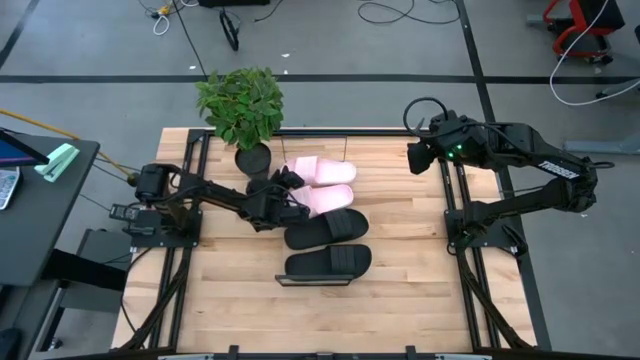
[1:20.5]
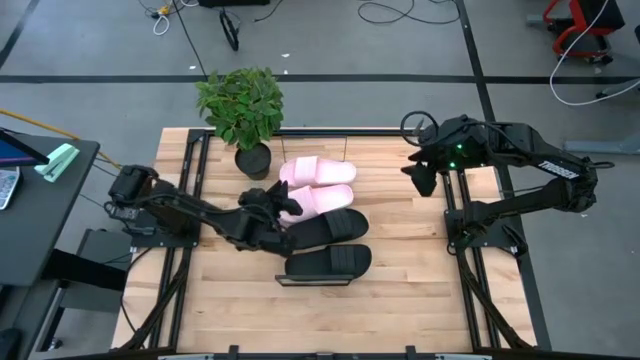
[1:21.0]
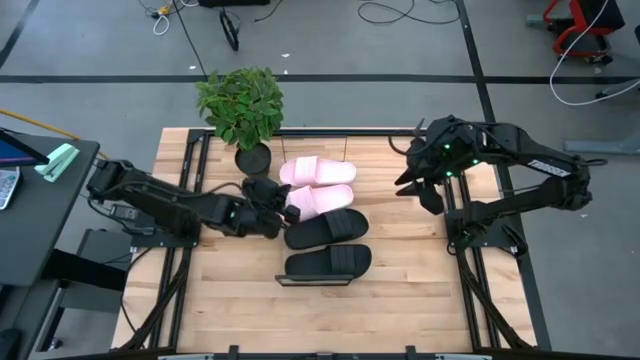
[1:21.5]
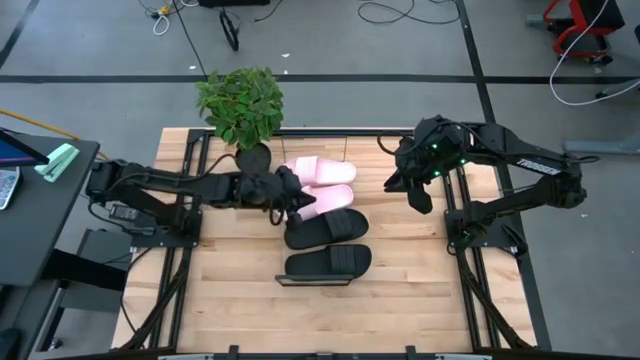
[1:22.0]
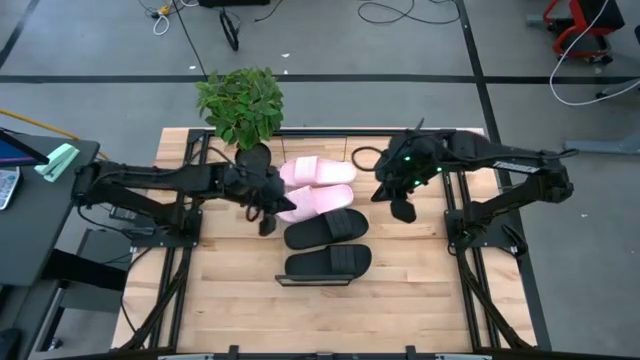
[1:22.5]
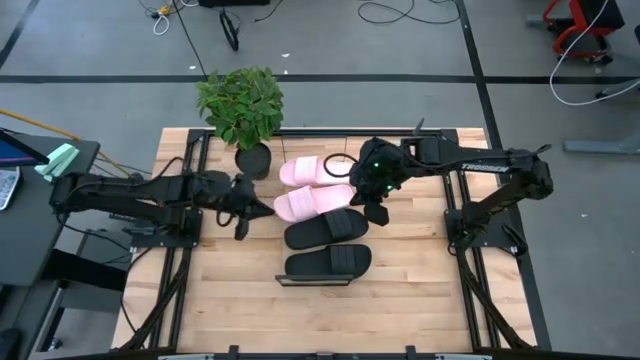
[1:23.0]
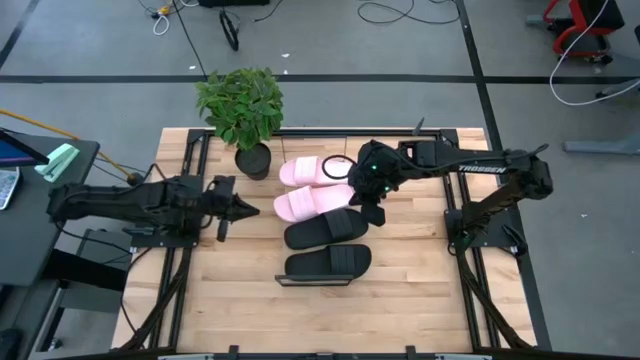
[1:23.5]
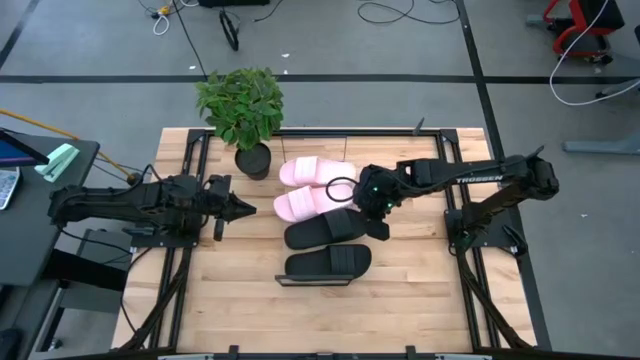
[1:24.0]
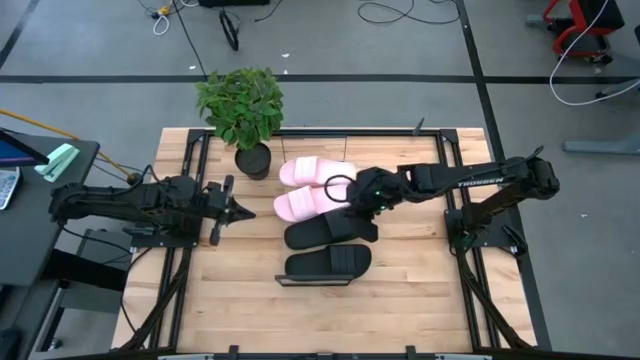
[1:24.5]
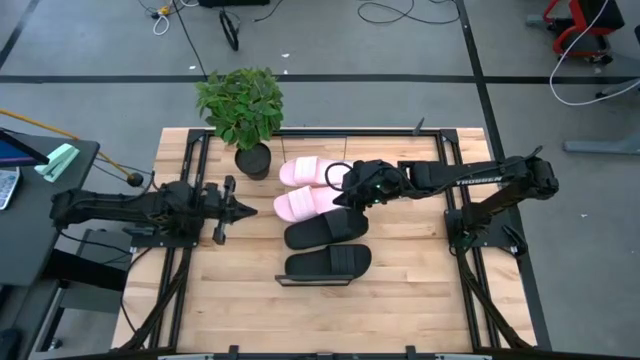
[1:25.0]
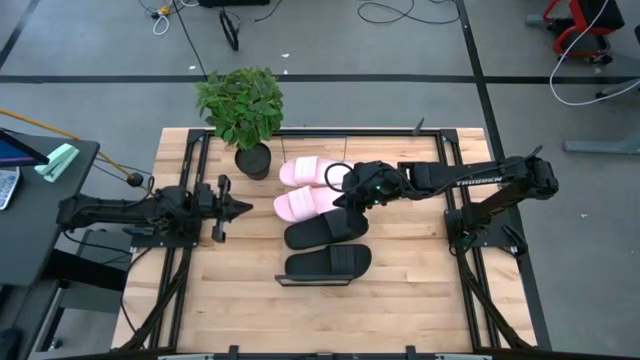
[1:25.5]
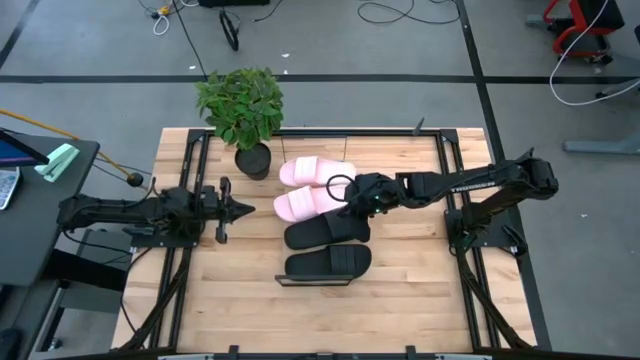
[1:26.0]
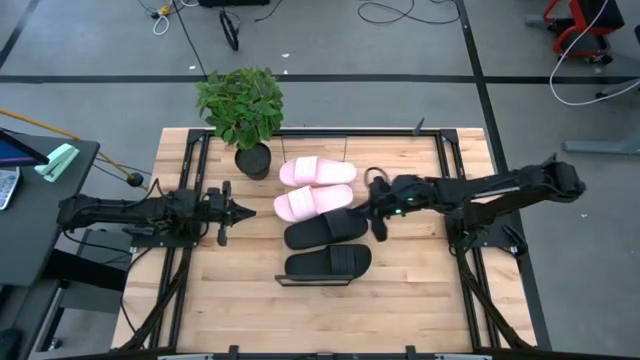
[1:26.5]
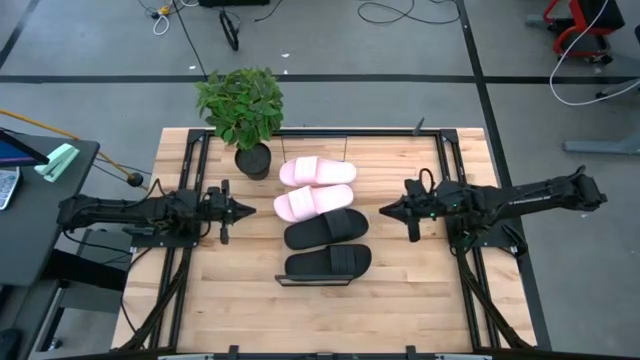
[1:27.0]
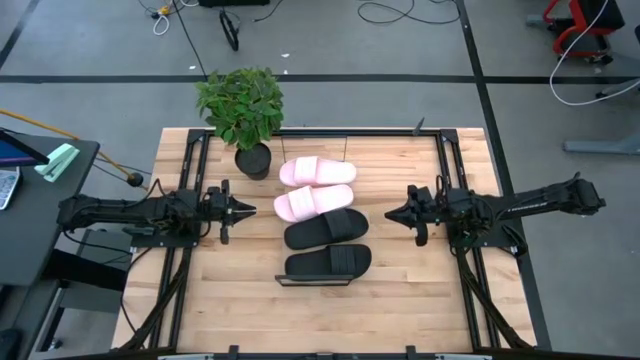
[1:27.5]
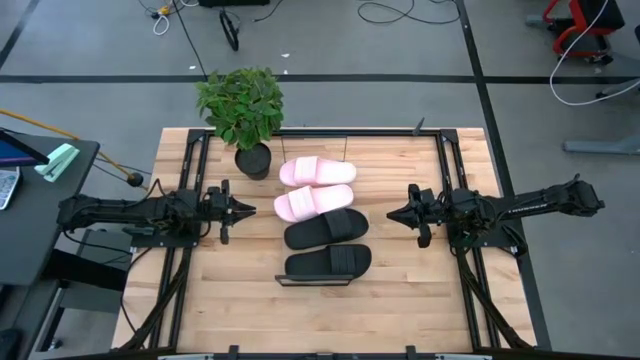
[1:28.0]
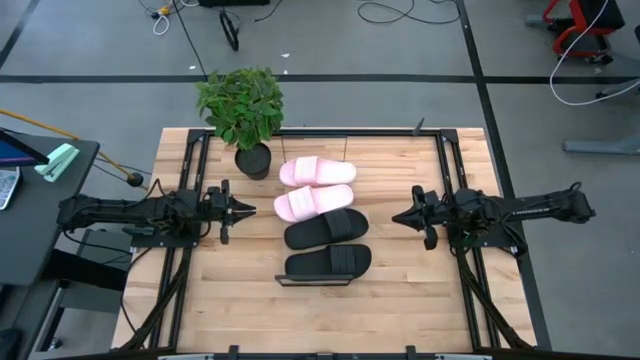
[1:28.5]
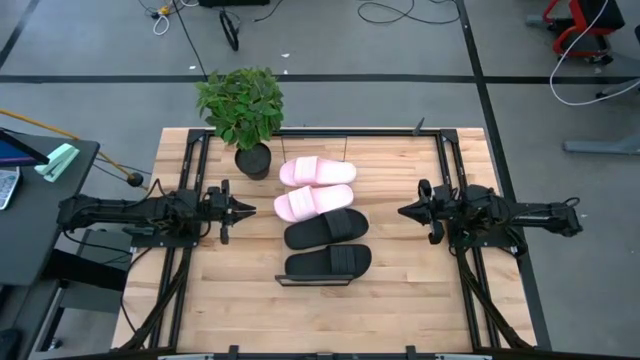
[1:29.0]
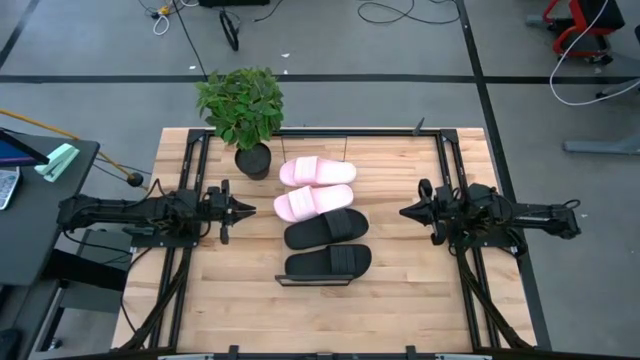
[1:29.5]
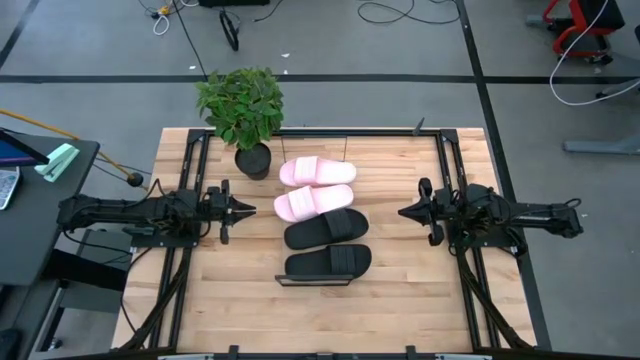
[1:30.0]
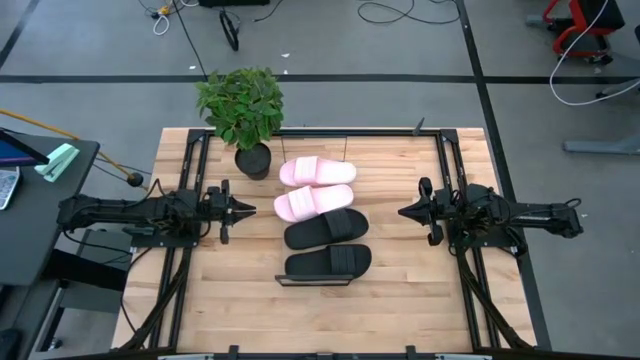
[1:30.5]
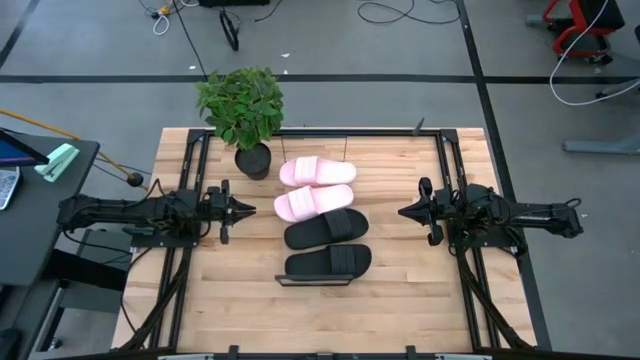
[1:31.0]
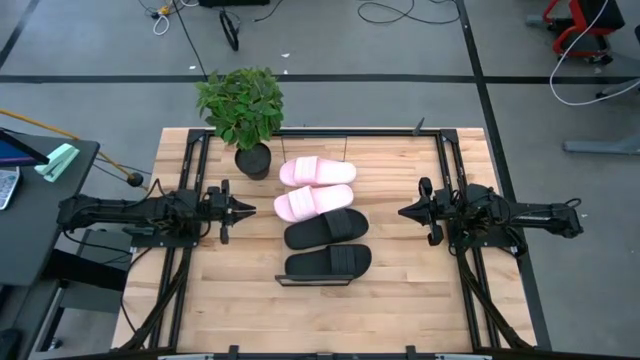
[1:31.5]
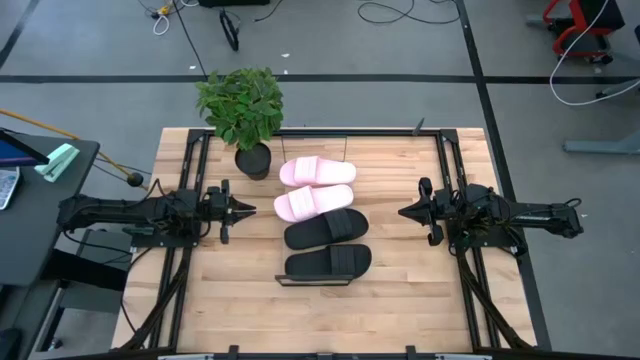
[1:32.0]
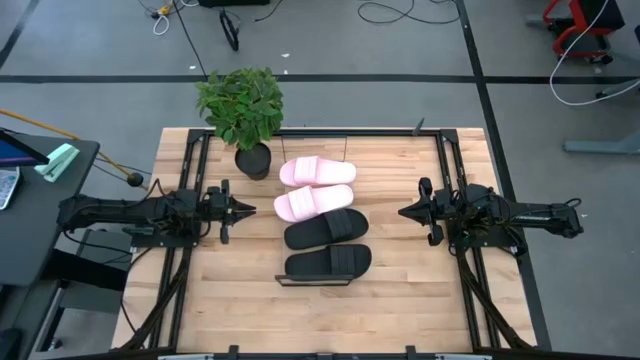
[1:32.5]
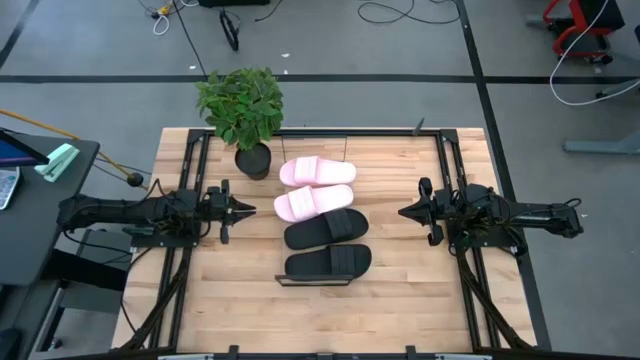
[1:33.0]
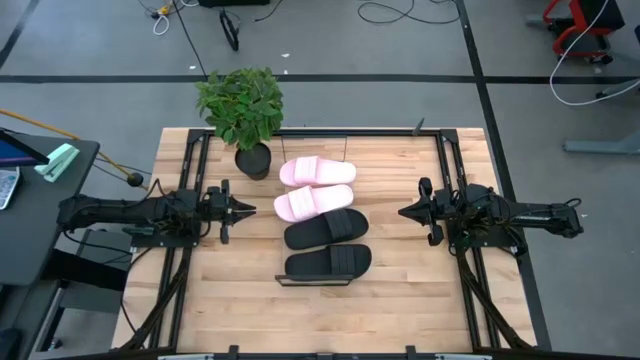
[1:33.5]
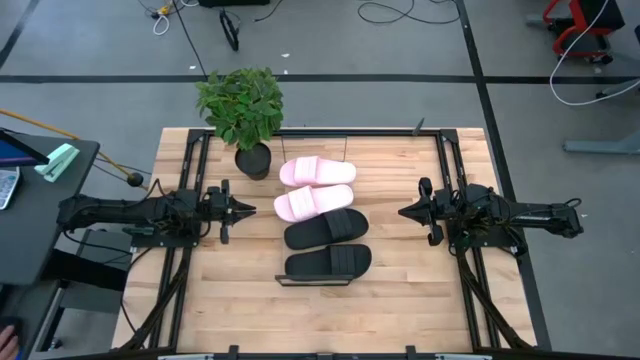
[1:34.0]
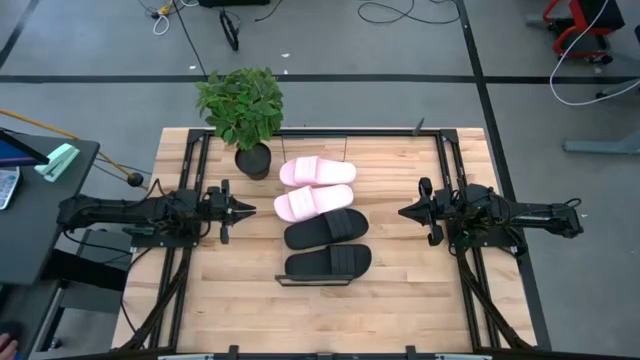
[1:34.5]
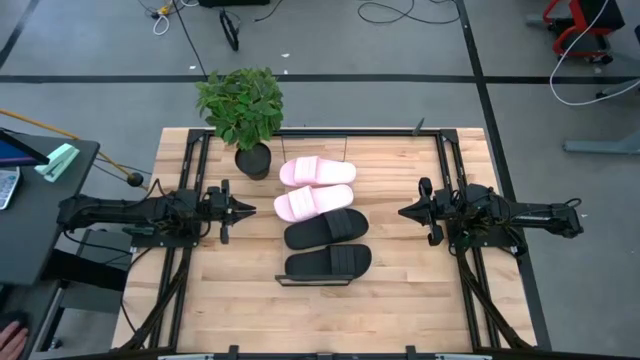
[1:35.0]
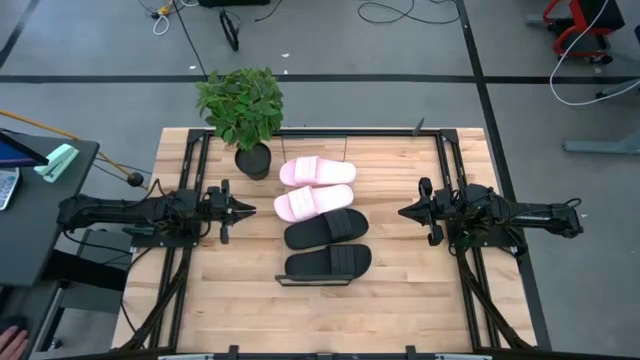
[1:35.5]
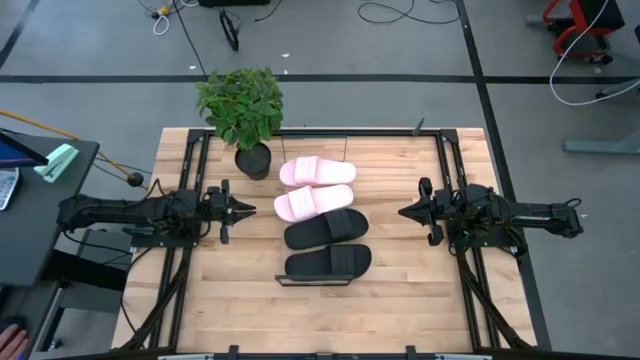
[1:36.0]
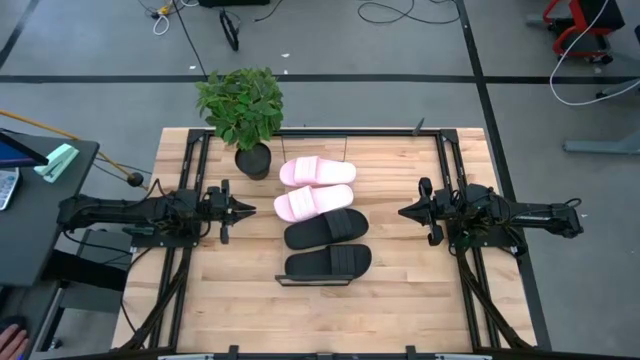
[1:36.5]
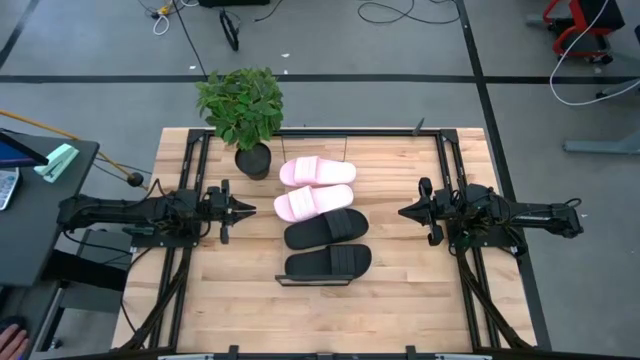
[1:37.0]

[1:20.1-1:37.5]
Task: Pick and place slides into the shelf
Return to Home Position

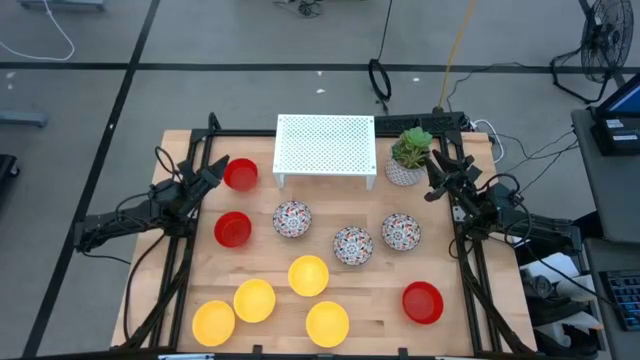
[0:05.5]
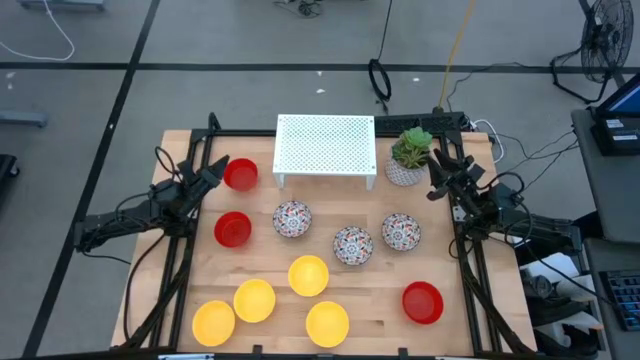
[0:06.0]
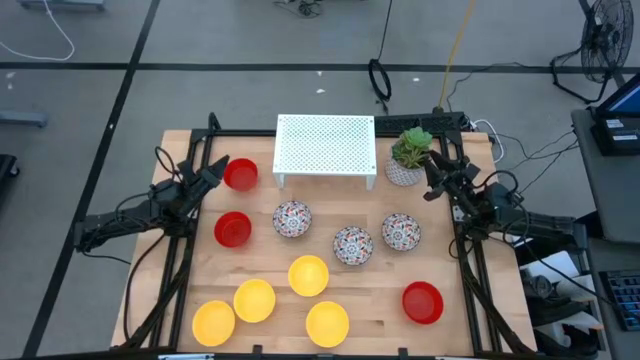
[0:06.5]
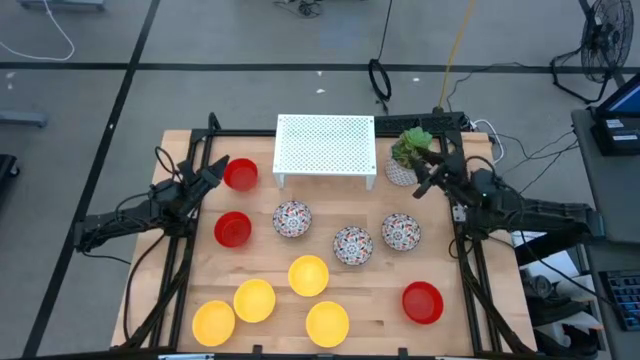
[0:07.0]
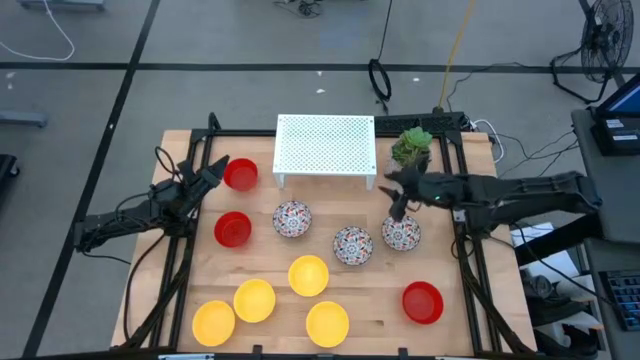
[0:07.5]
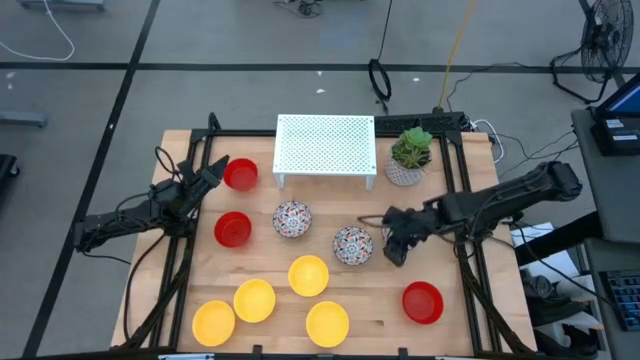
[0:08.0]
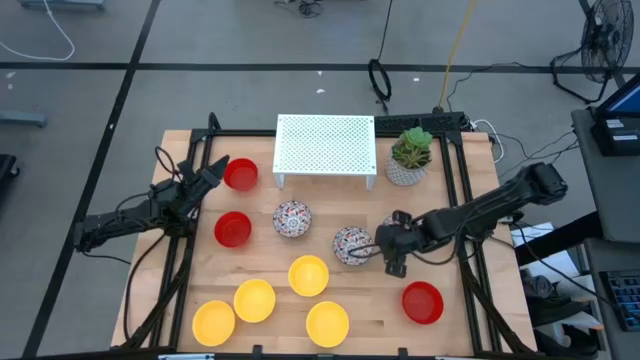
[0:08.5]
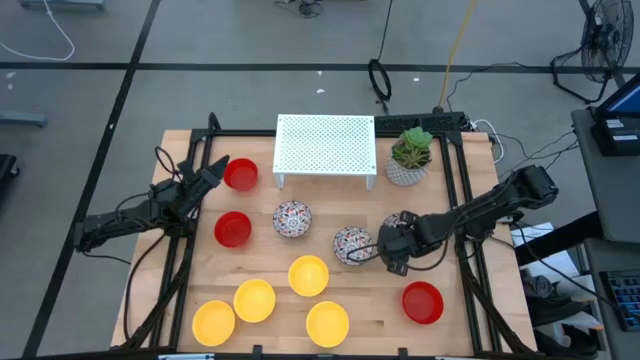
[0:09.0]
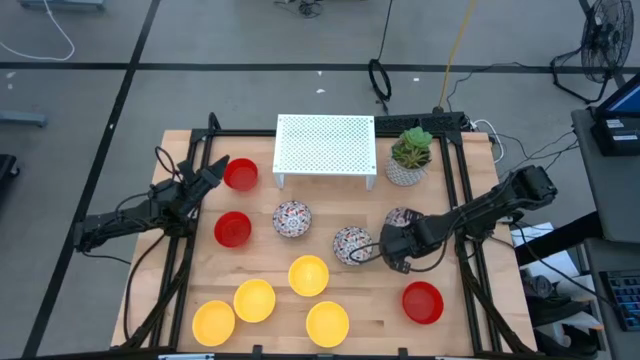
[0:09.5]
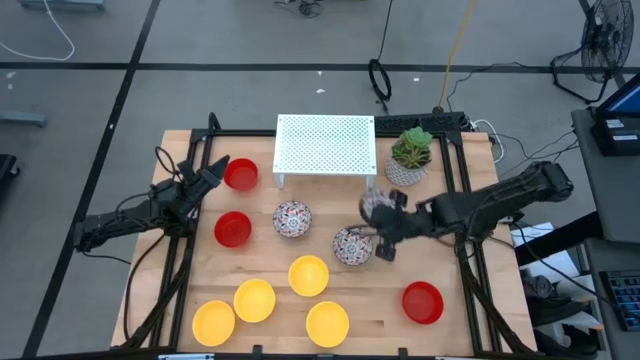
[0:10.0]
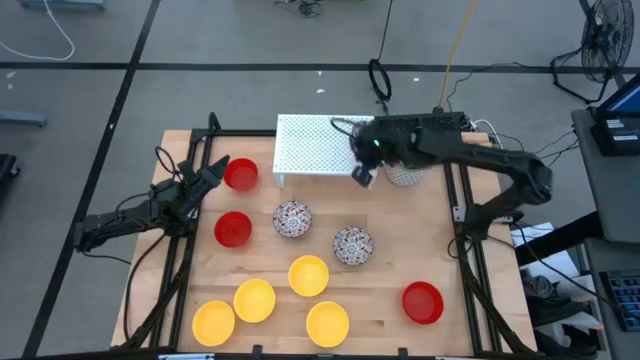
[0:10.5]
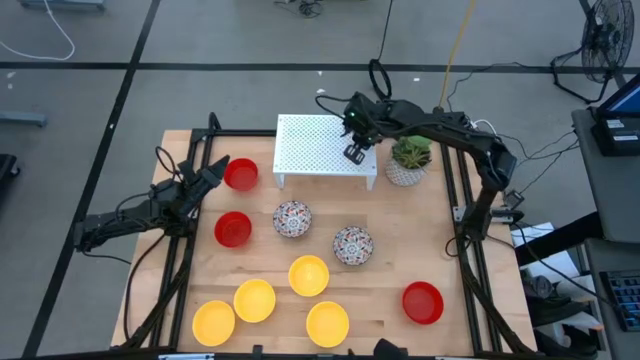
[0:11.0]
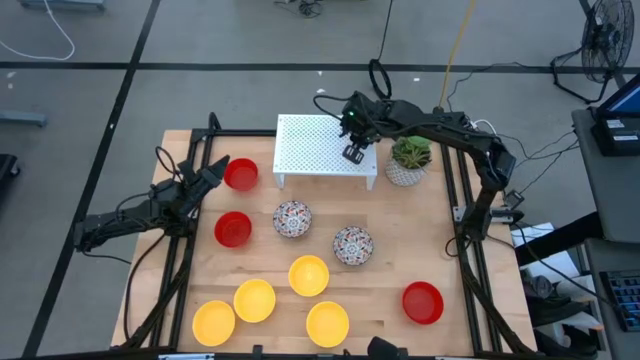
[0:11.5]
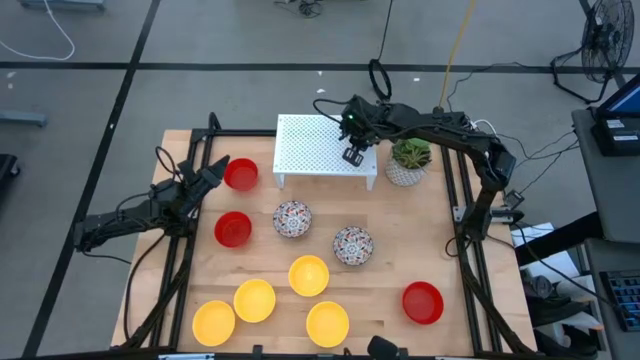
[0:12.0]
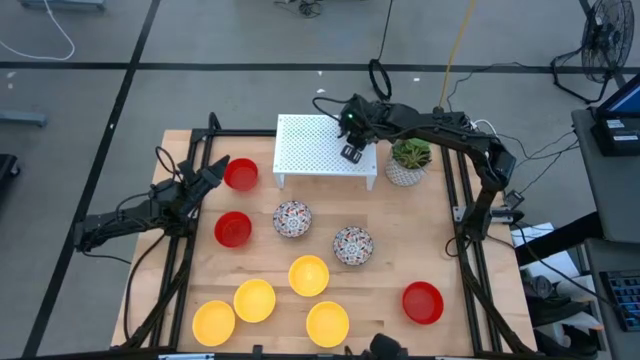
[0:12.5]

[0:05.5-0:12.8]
Task: Pick & Place Mini bowls
Put the white patterned bowl on the shelf
